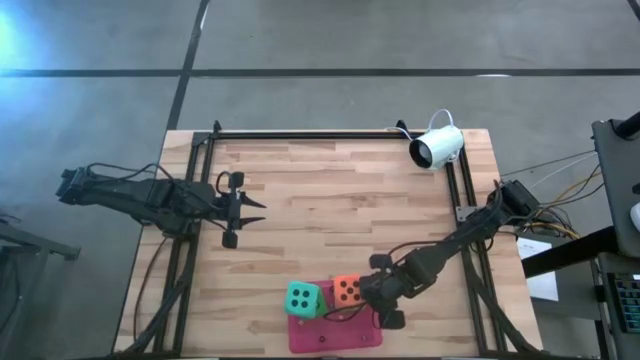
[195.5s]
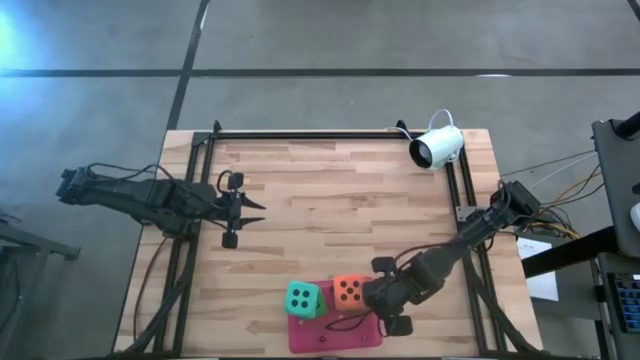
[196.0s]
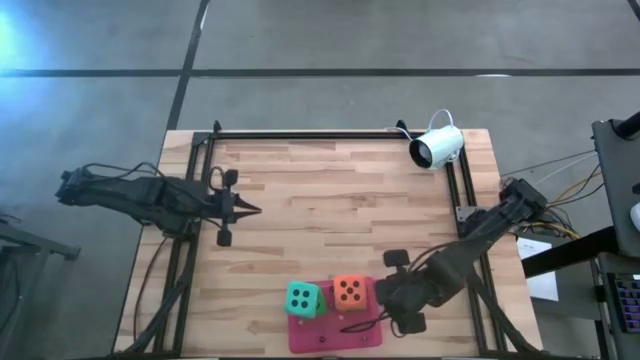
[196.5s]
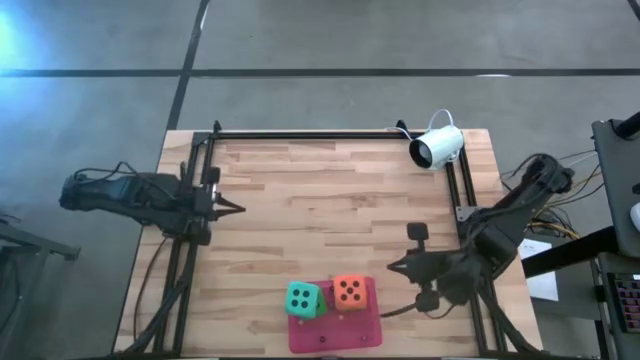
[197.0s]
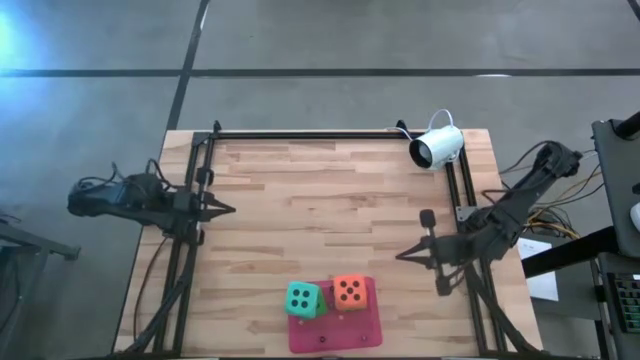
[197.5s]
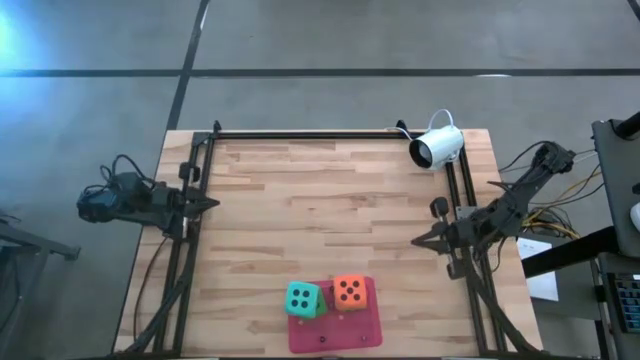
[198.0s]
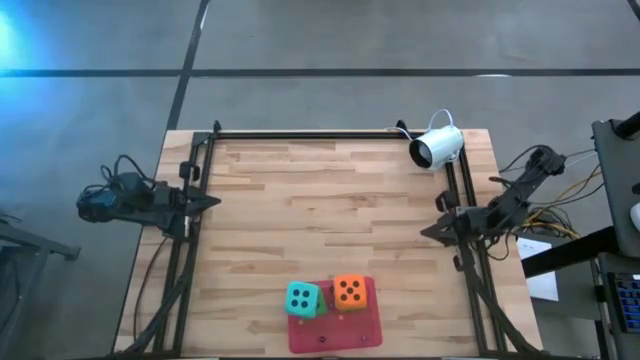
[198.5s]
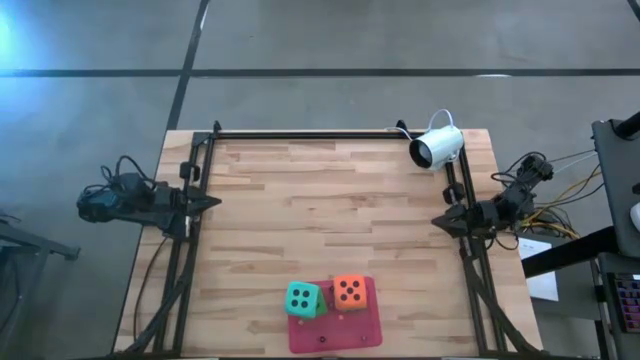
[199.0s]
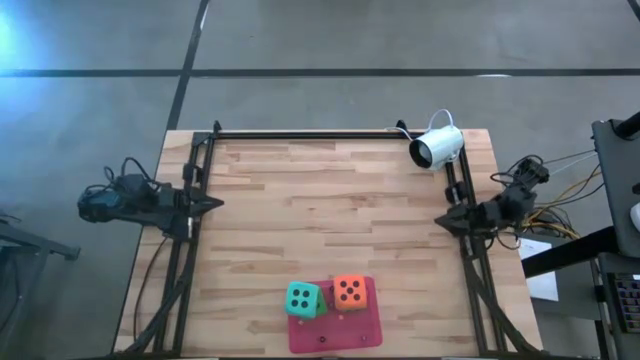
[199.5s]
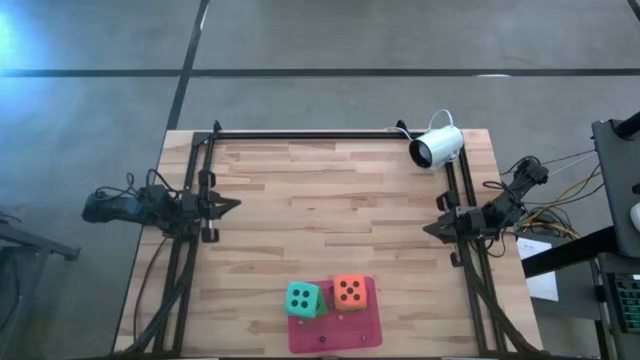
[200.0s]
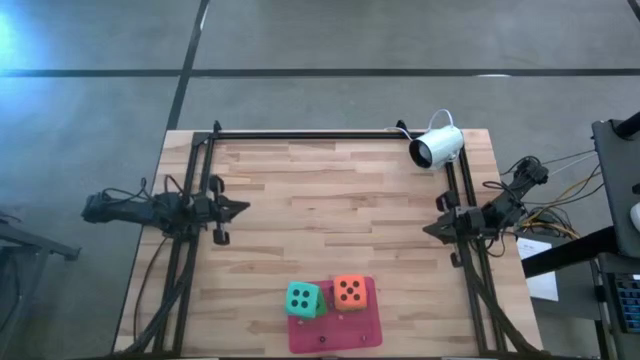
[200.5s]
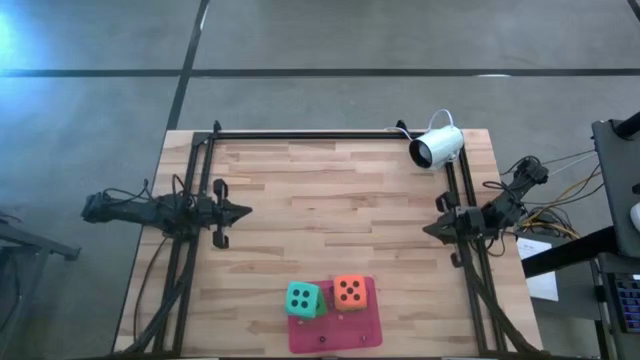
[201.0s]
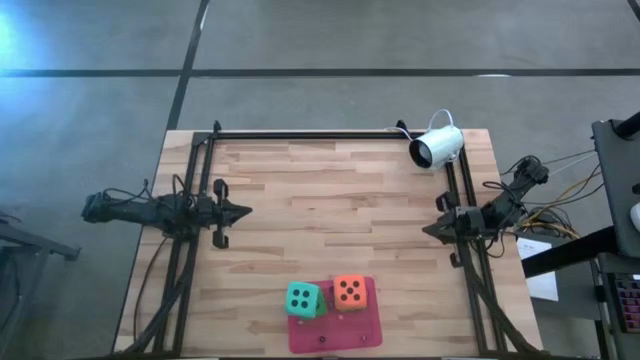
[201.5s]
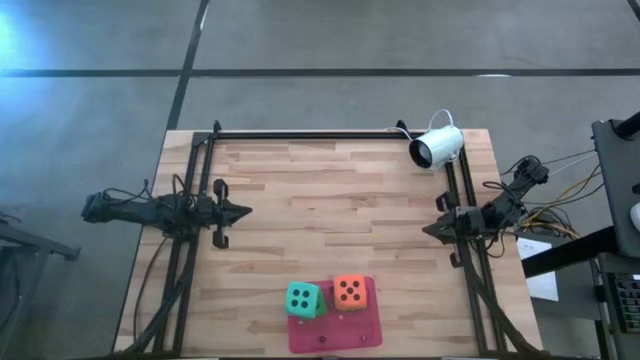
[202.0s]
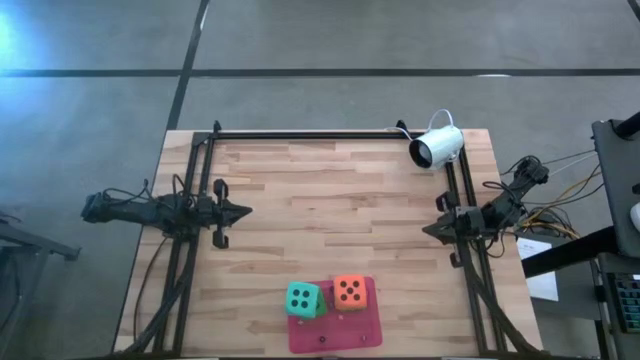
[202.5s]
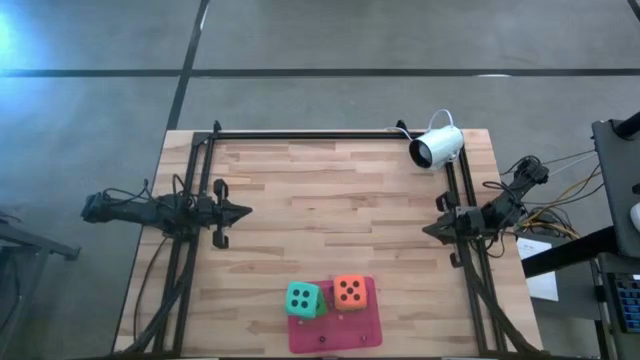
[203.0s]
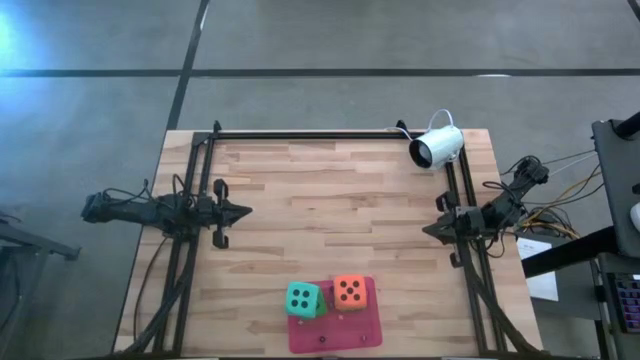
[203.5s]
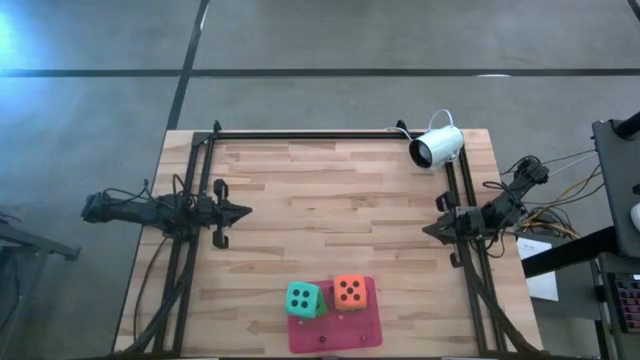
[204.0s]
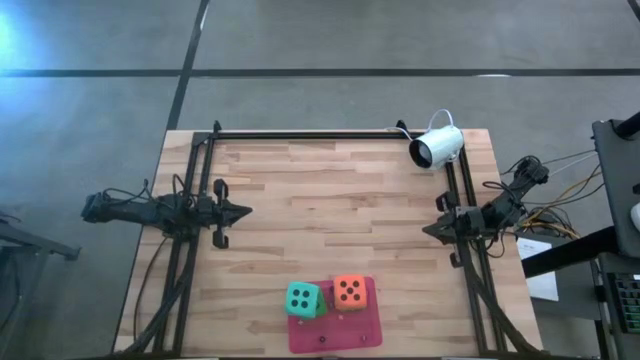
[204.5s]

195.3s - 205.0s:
Task: Pick & Place Dice
Return to Home Position

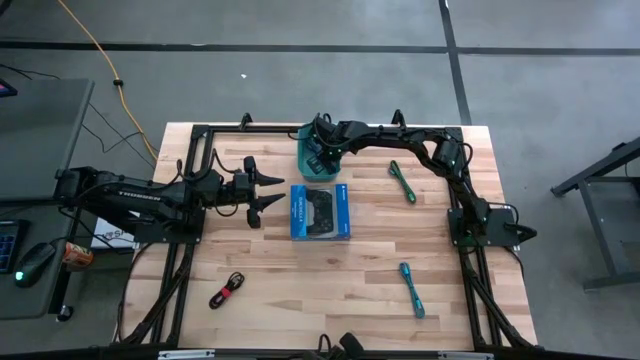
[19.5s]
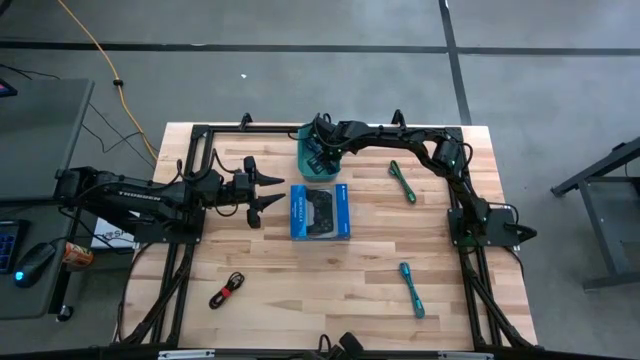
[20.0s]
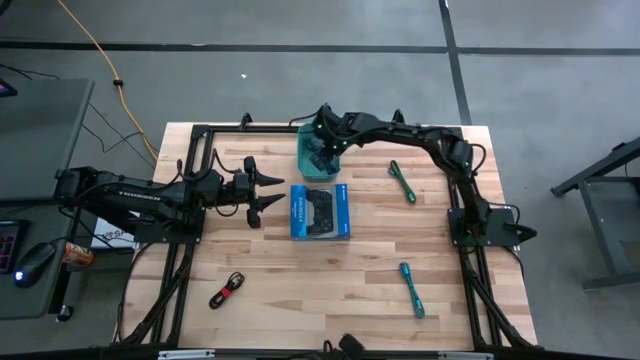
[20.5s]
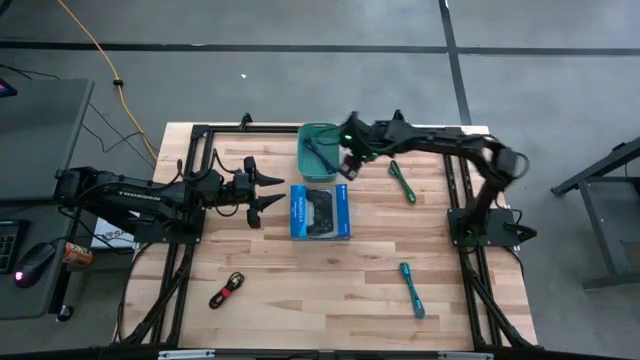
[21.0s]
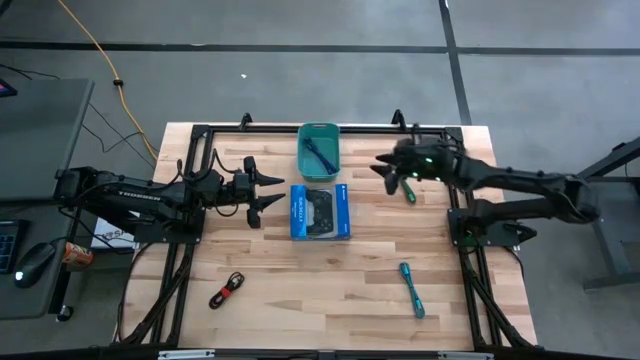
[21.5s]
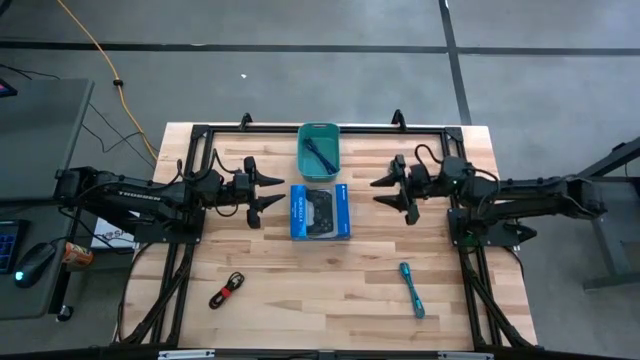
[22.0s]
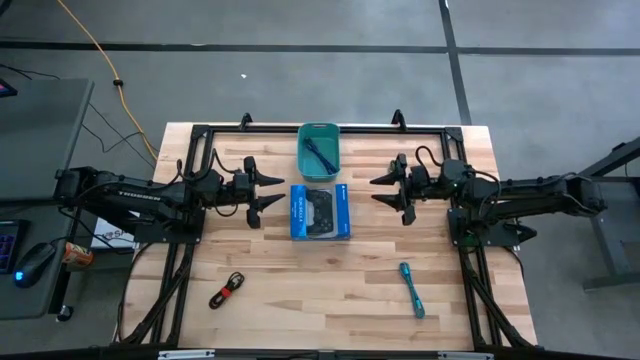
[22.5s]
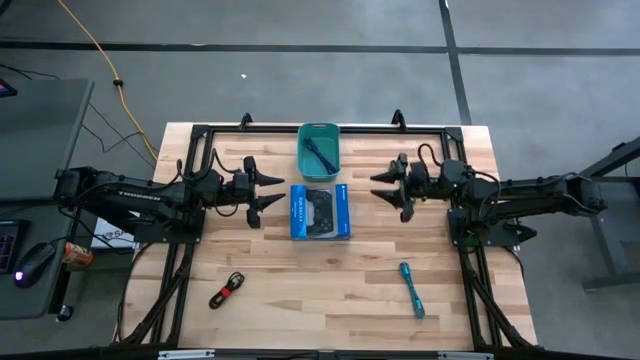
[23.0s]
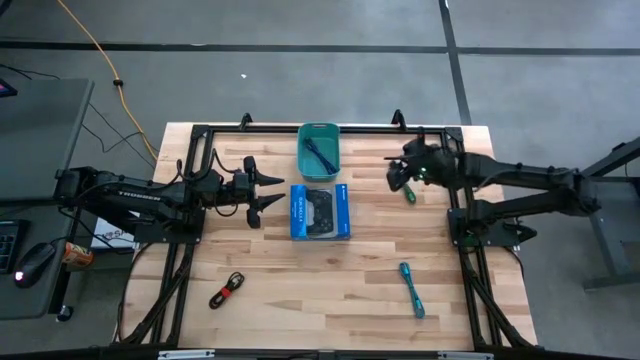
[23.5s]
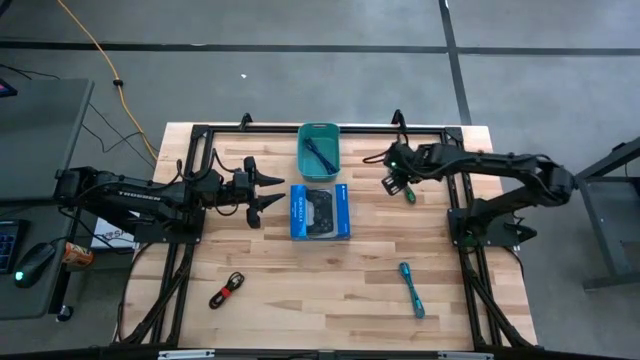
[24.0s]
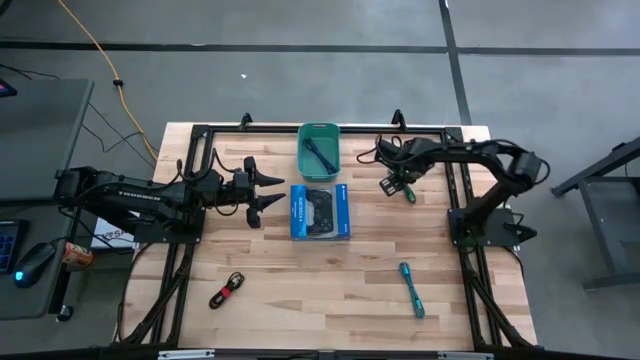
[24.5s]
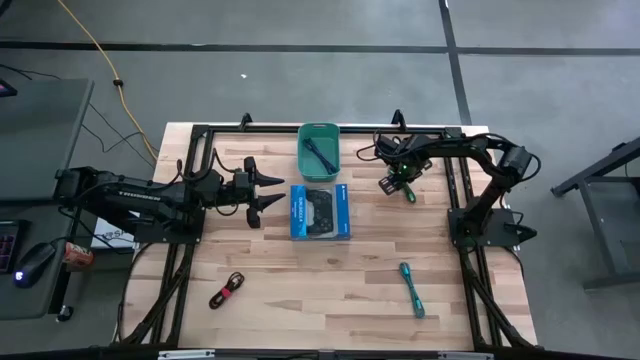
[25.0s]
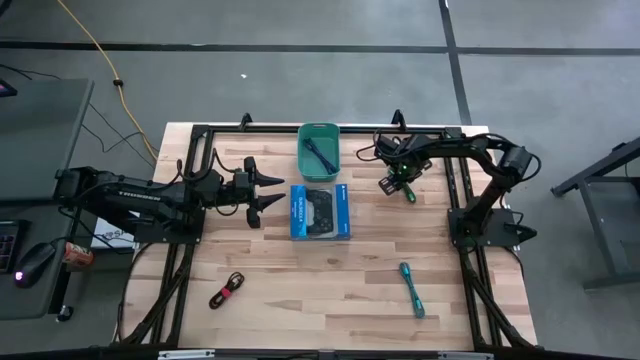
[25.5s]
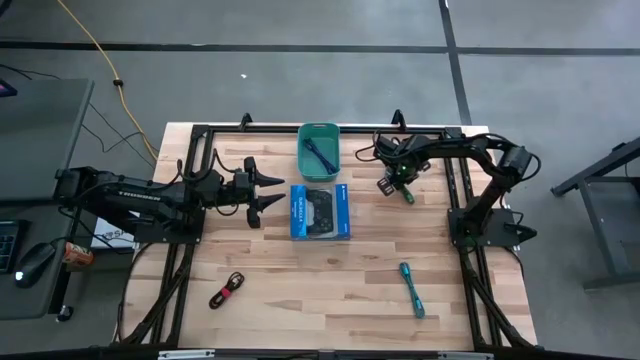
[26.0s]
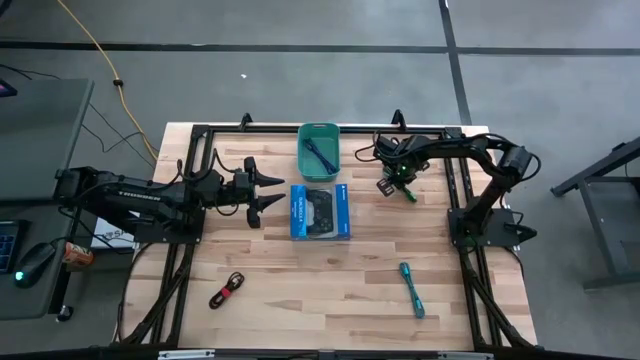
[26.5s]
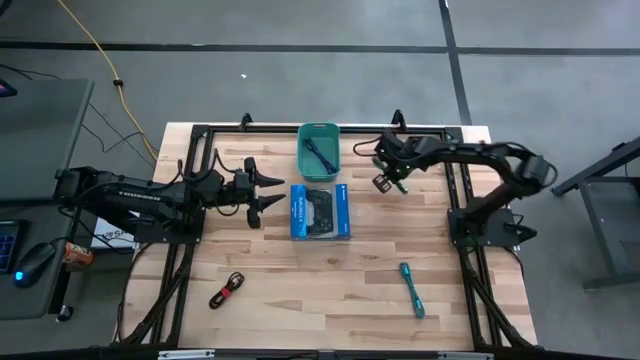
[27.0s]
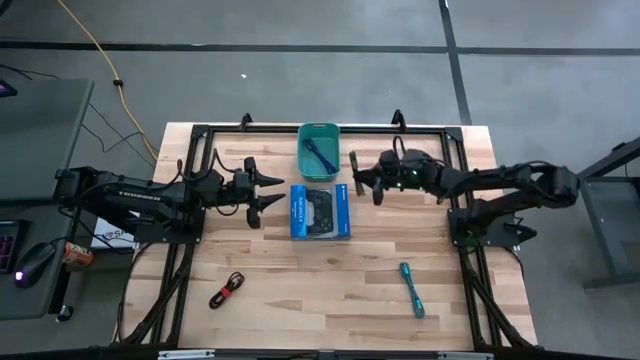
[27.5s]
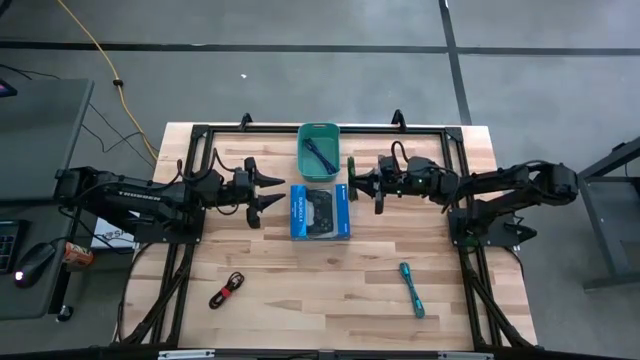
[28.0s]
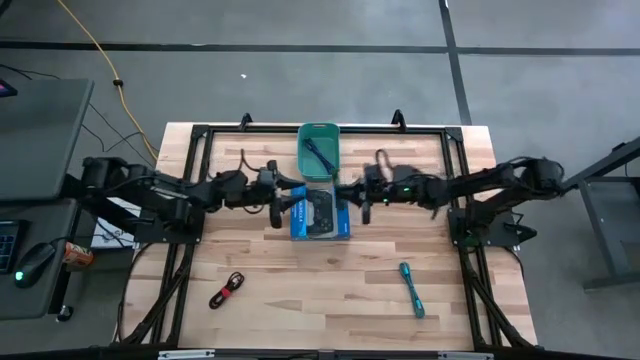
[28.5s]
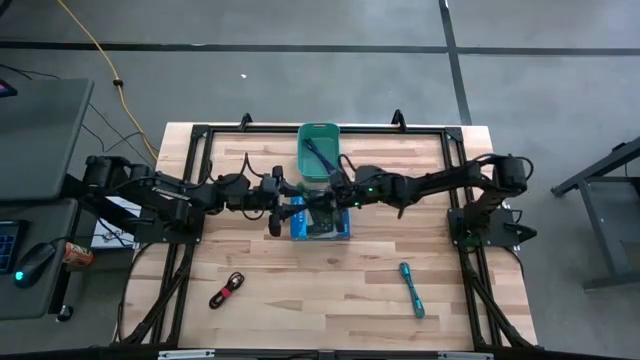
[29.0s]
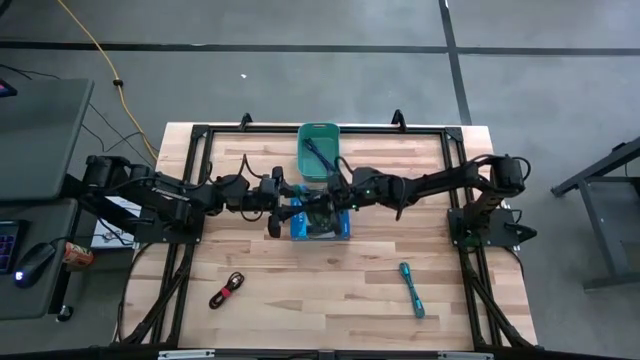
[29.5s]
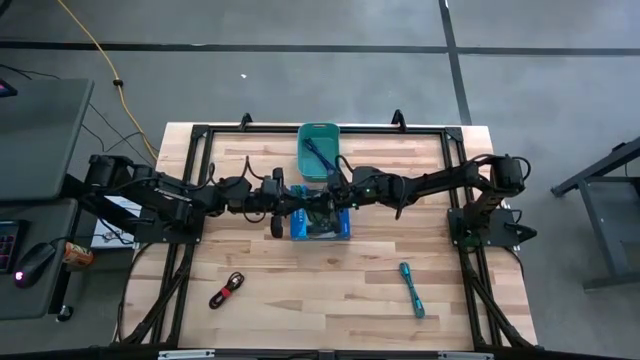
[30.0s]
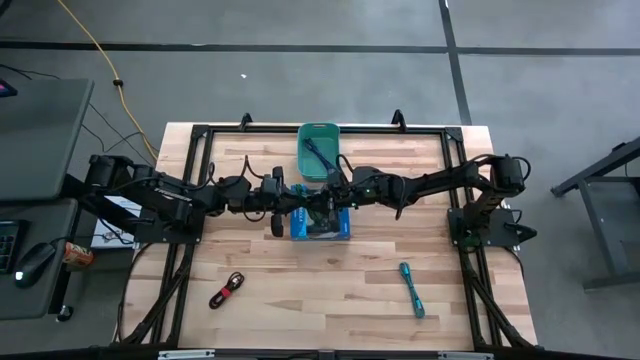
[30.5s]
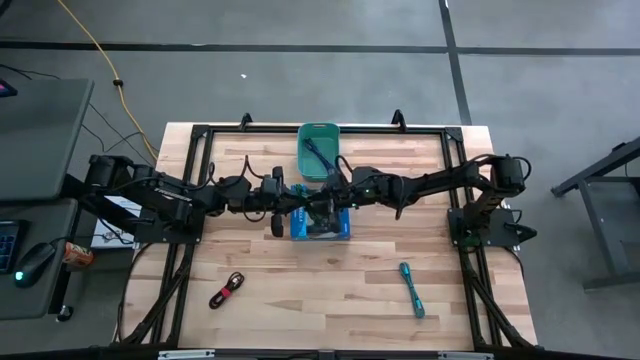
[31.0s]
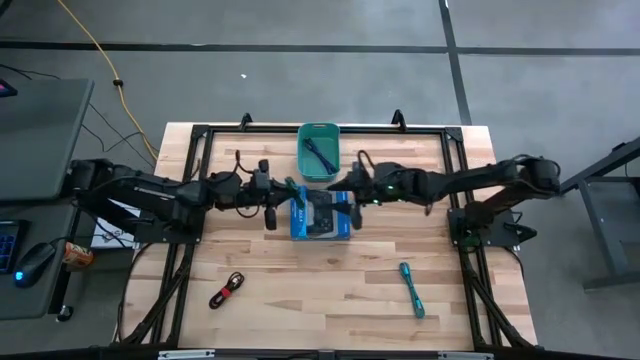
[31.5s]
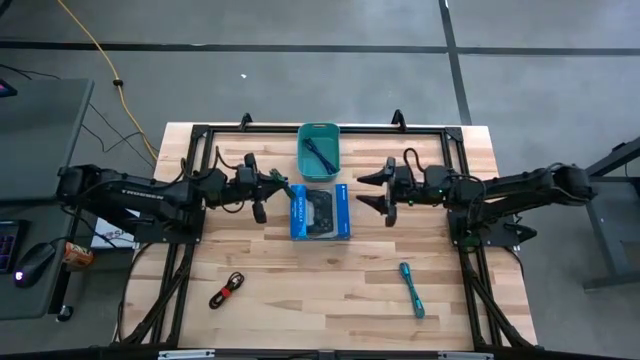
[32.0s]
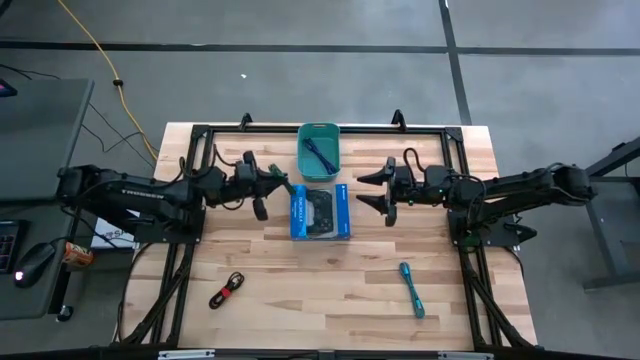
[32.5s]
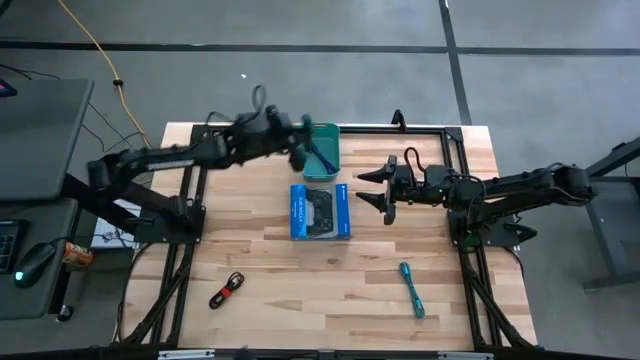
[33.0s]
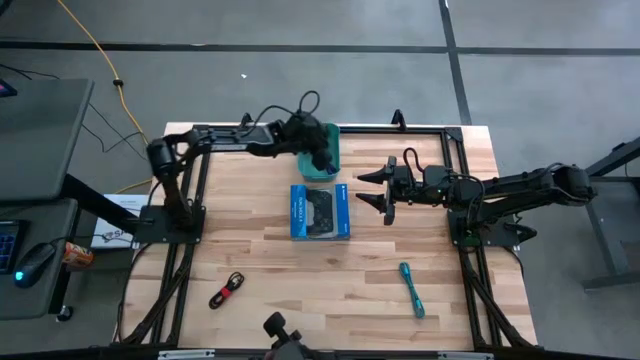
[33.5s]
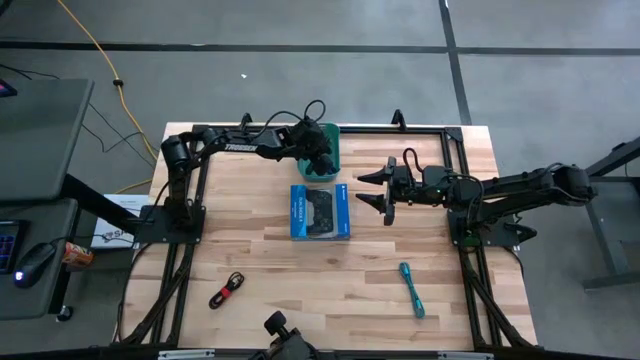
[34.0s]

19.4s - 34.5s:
Task: Pick and place USB-C Cables
Put the green charger cable into the light blue bin
